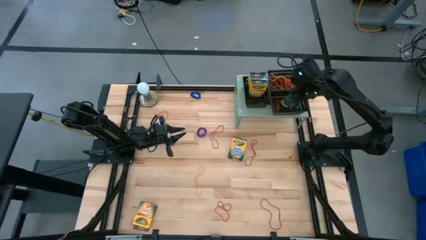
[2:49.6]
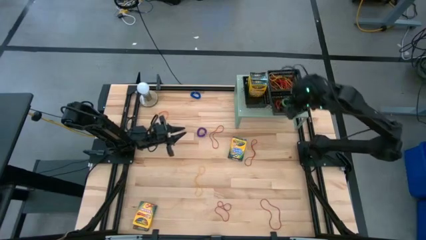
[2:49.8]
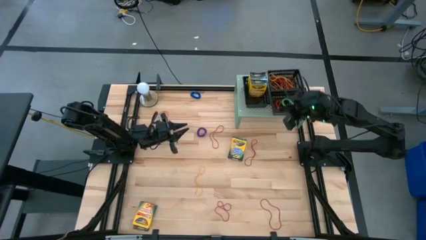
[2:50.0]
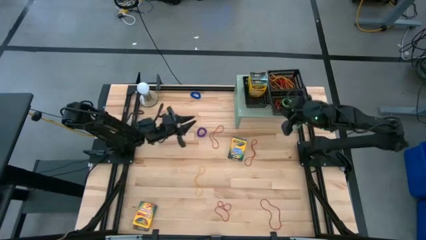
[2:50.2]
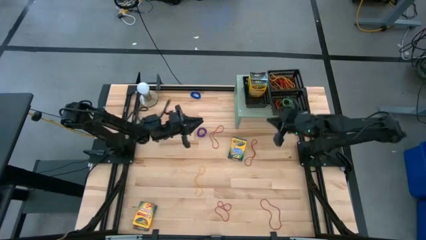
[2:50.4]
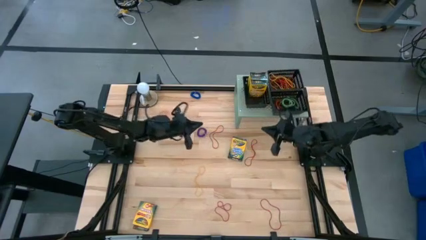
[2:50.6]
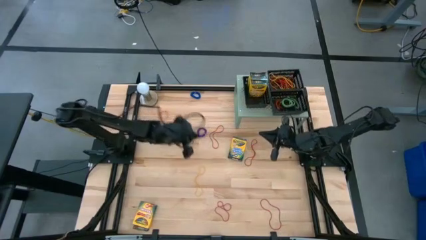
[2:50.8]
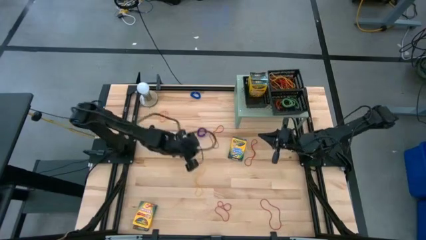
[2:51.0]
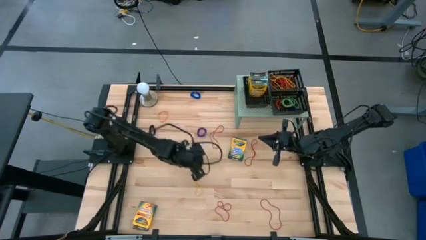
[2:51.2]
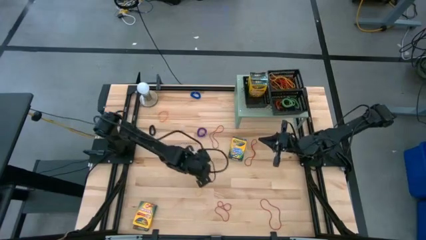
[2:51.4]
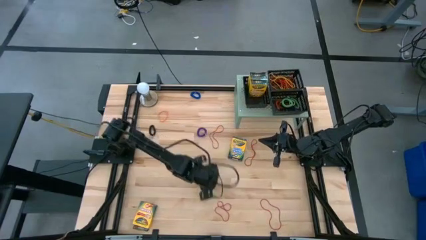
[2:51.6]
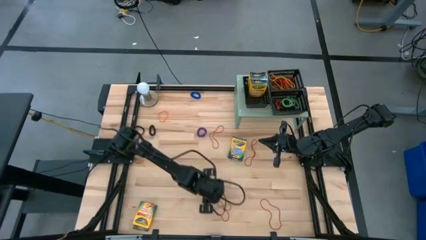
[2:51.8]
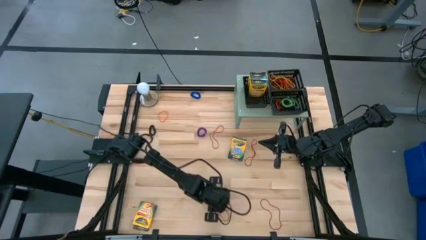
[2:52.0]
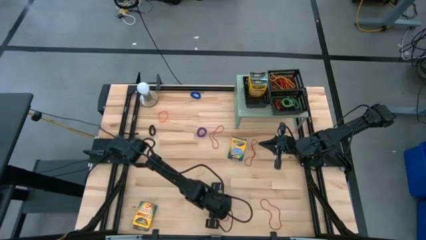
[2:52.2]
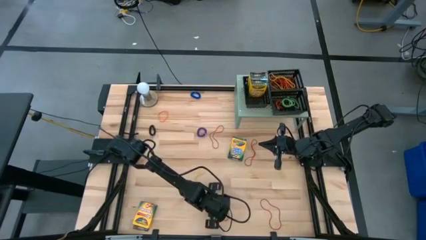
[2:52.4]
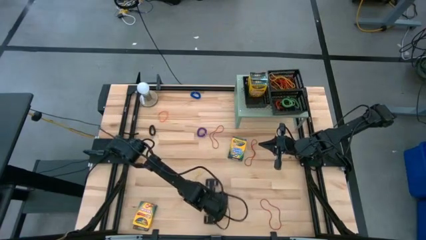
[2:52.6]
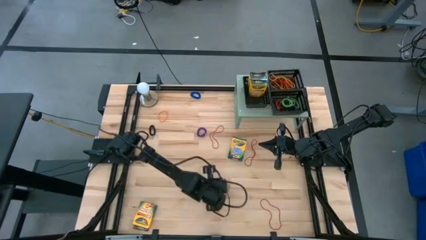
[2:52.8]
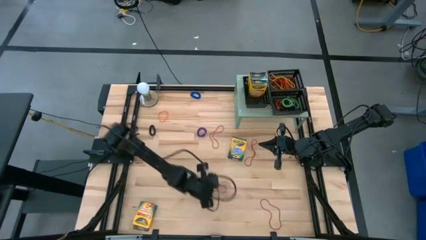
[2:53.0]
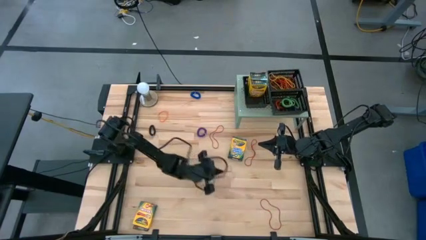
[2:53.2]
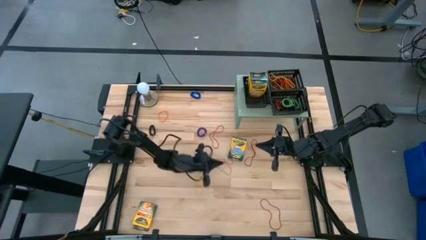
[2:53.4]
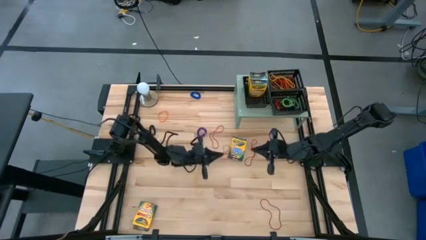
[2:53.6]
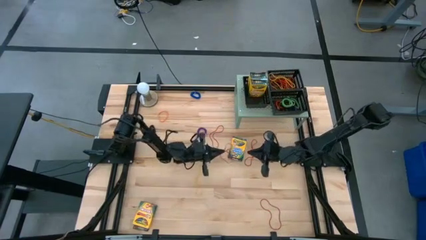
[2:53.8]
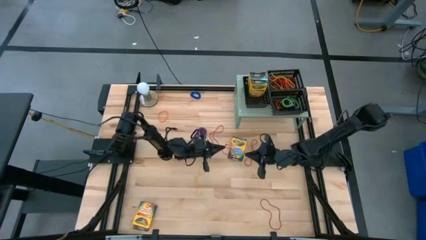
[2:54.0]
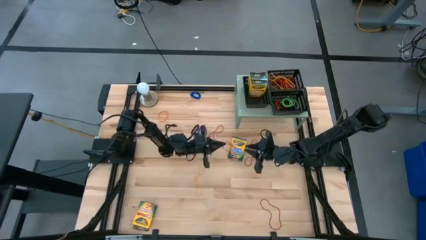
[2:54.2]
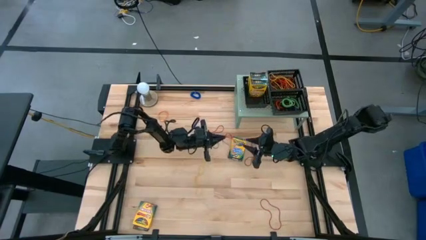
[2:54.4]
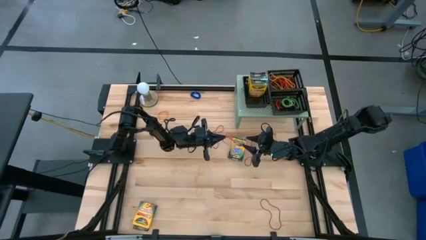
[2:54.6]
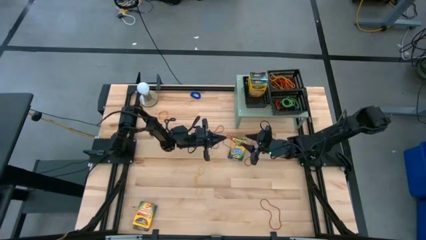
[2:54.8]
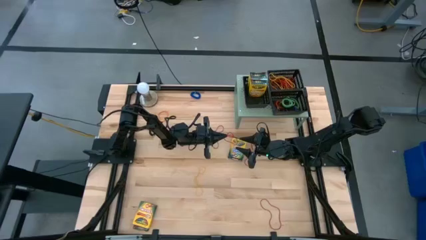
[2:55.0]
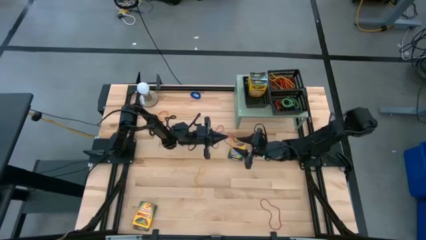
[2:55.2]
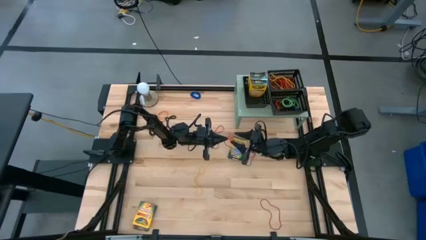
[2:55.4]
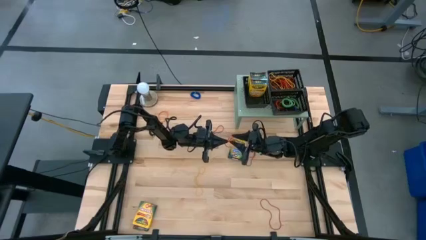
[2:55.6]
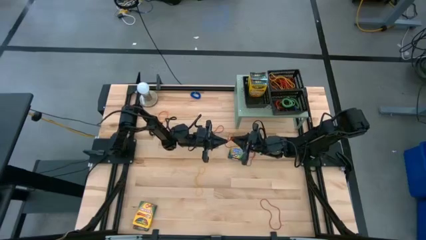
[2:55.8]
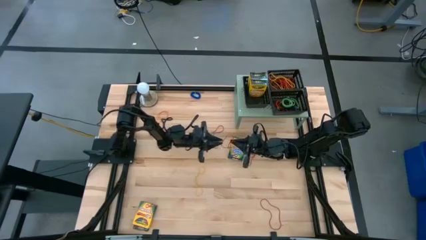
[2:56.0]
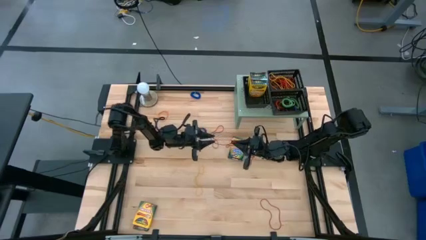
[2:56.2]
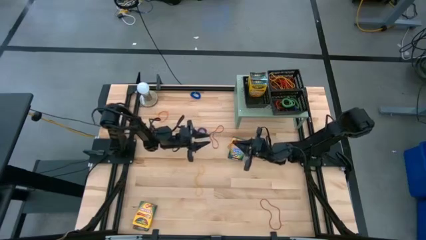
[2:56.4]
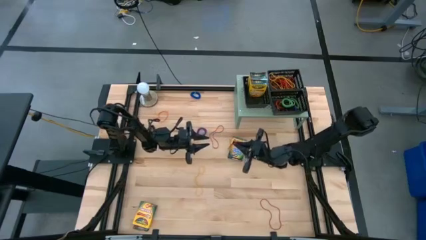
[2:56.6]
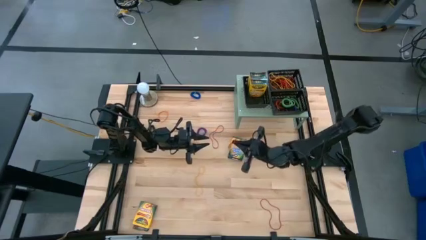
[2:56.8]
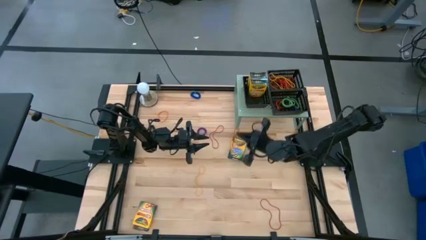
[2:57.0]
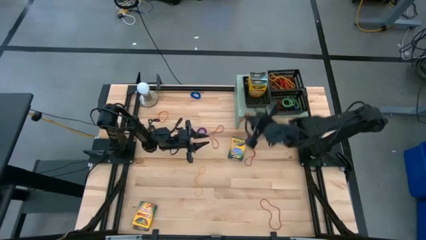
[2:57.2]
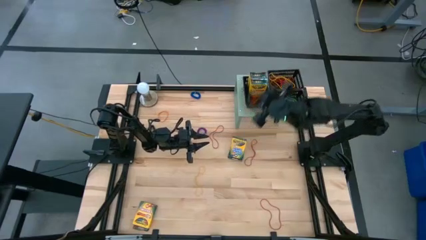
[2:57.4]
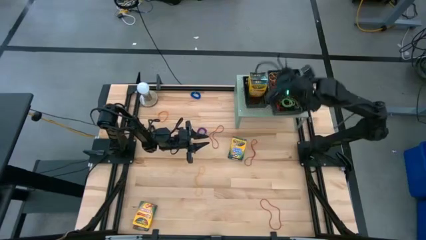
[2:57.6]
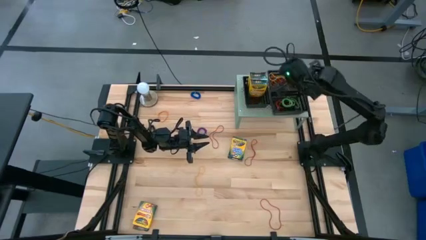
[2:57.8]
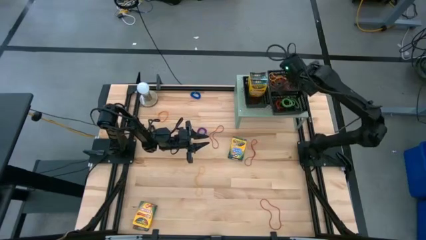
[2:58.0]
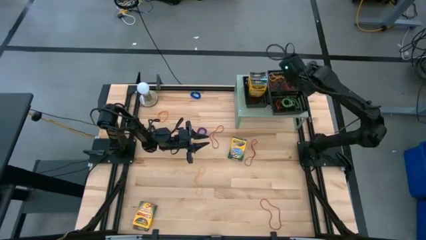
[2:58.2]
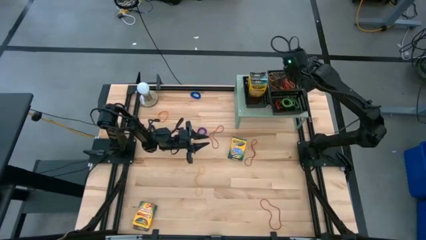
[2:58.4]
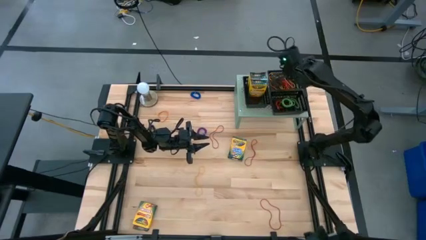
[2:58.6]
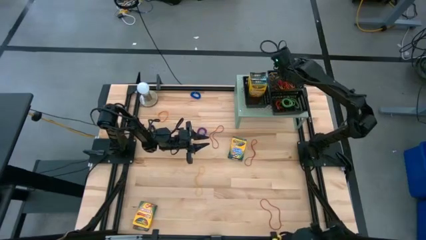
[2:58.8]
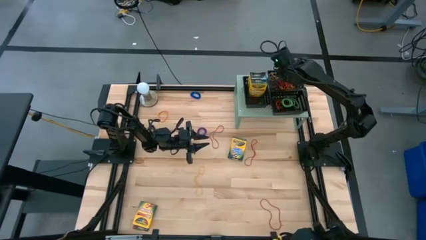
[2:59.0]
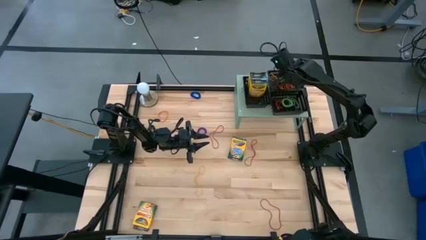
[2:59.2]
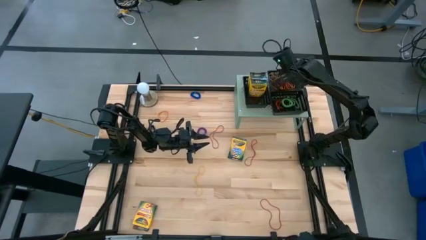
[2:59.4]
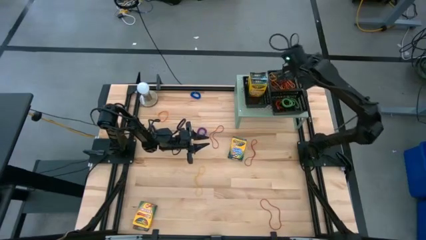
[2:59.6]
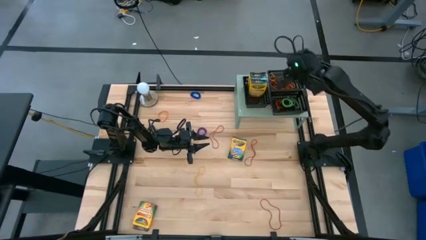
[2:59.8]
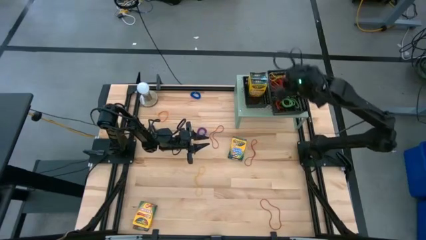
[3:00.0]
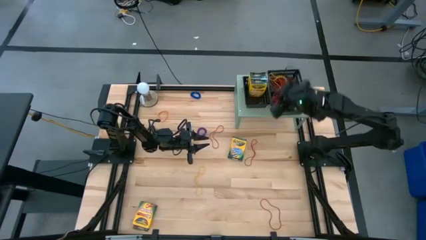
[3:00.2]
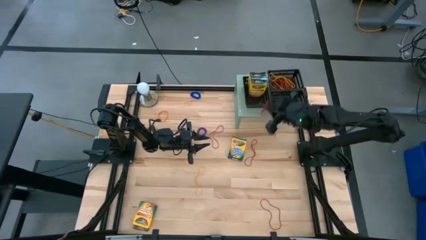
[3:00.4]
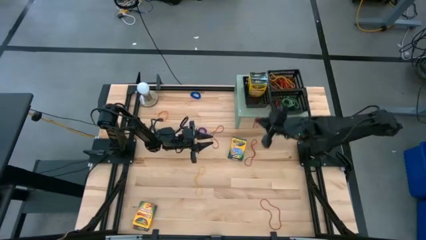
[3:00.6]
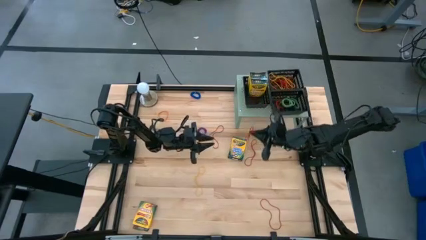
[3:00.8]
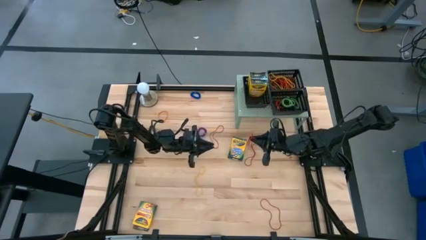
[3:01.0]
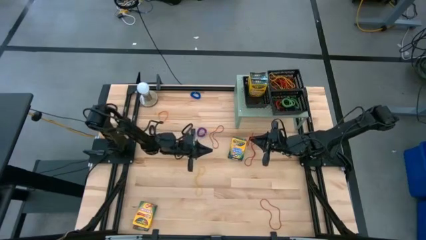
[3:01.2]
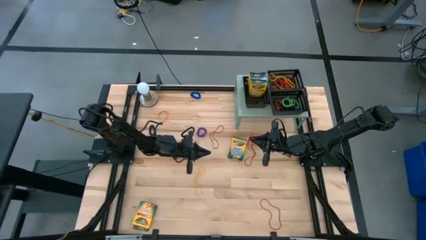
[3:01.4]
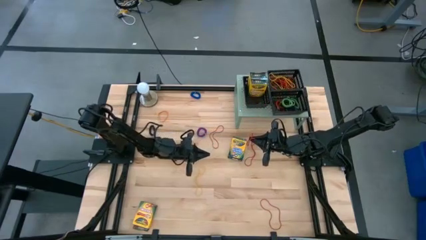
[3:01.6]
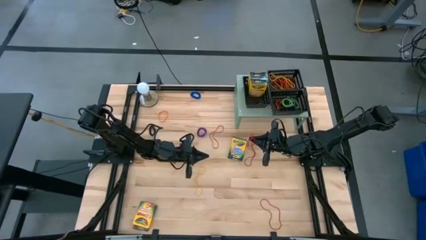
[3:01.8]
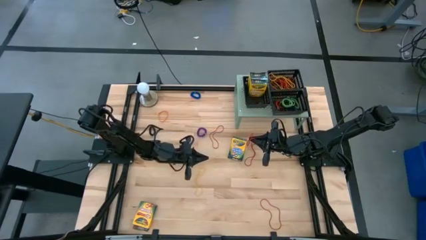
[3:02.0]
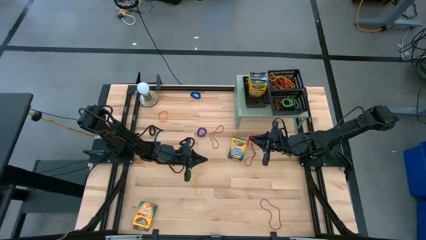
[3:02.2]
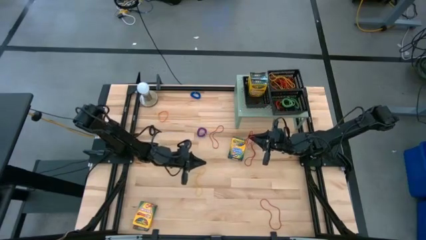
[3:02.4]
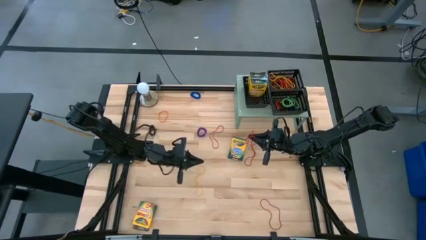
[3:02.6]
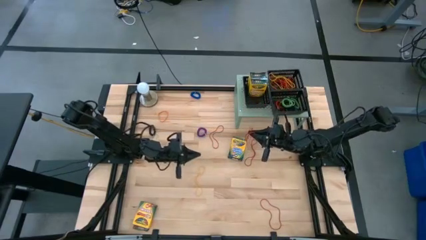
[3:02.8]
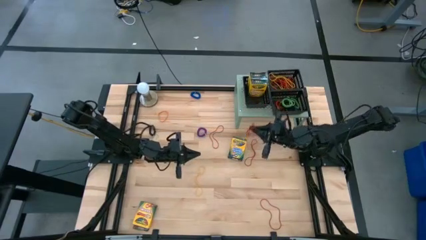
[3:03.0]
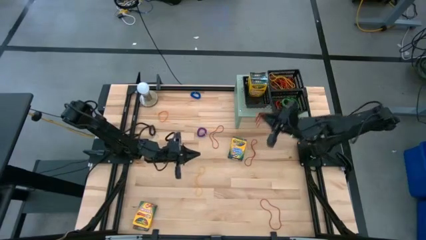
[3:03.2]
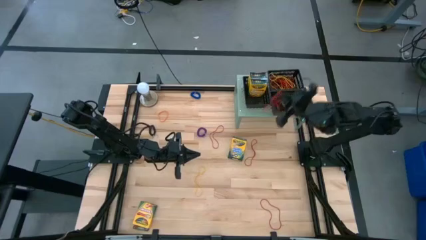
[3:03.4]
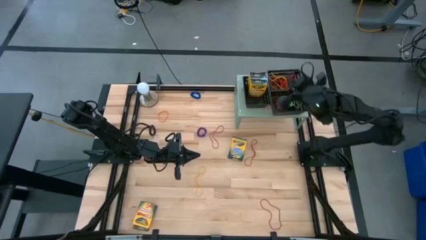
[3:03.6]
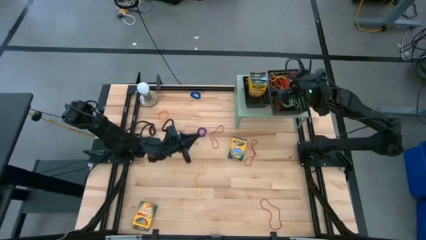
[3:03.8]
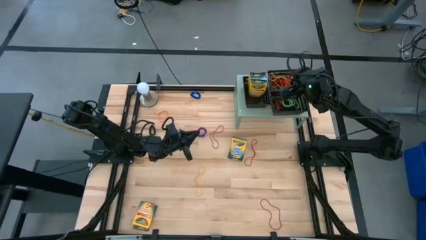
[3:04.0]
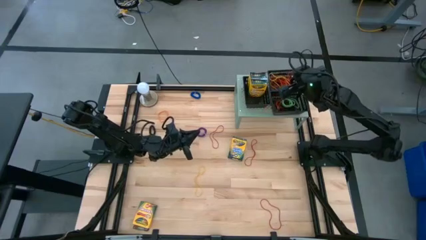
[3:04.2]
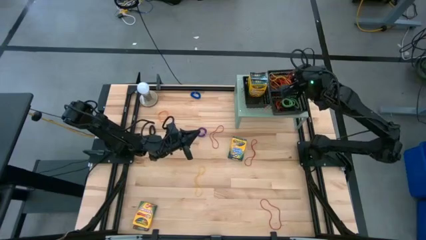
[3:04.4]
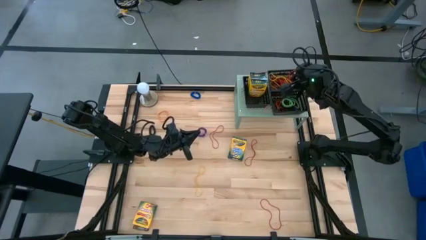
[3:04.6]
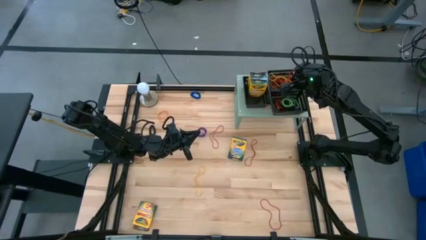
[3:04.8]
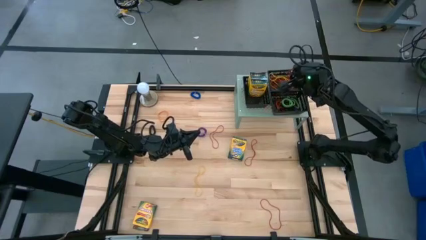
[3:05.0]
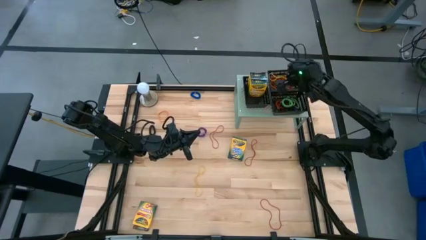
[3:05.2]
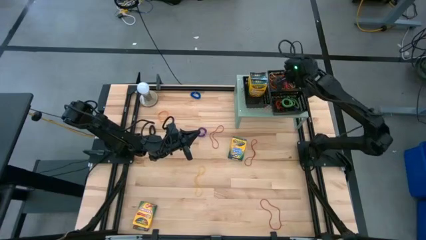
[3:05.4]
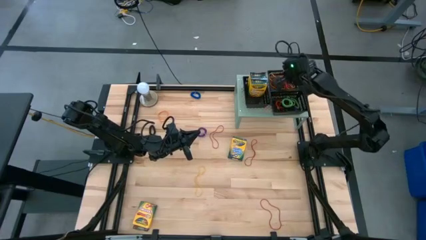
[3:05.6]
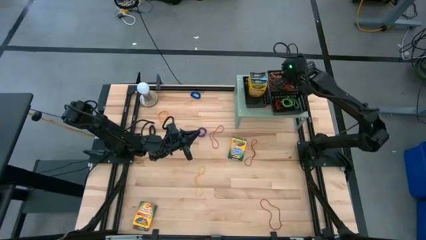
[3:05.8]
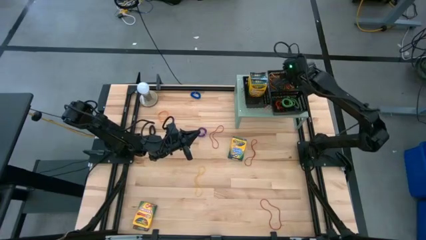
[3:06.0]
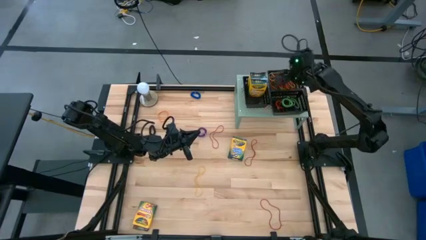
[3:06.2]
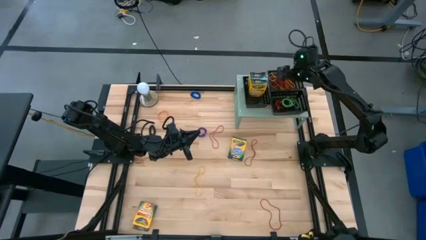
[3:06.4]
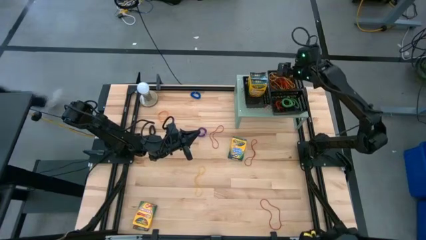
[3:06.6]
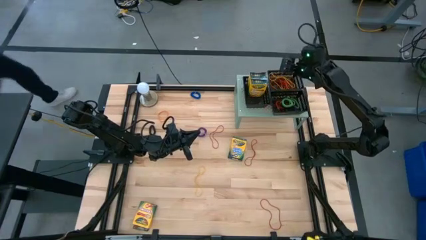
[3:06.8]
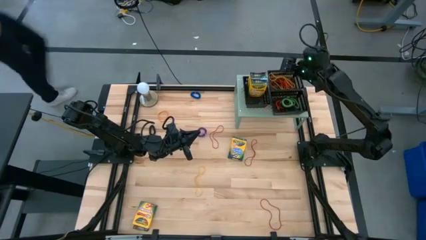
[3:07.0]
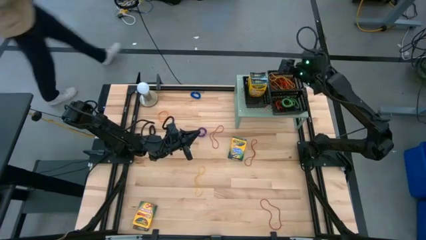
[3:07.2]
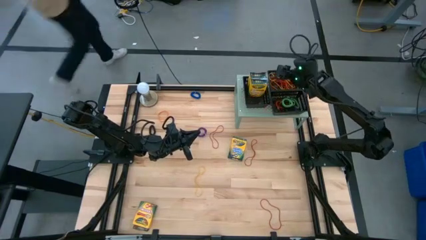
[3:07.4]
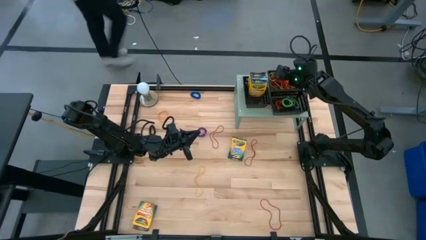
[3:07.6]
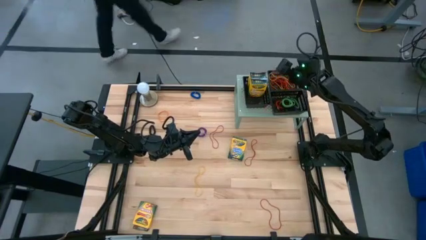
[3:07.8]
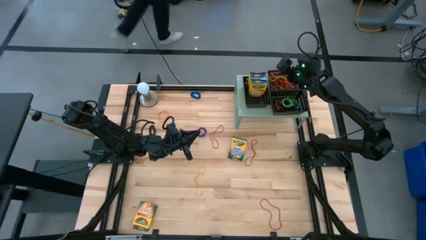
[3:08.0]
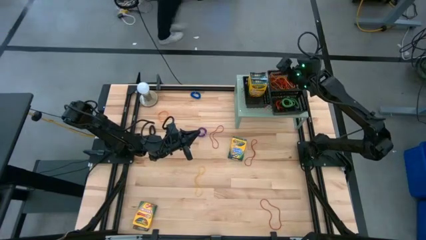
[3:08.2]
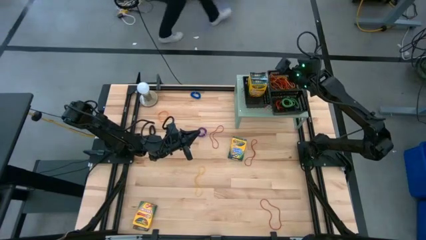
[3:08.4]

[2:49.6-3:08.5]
Task: Pick & Place Office Desk Supplies
Put the red rubber band into the top right black bin on the shelf
